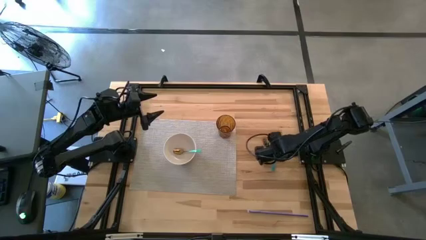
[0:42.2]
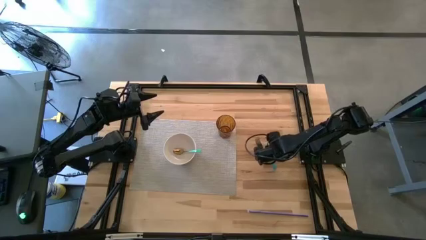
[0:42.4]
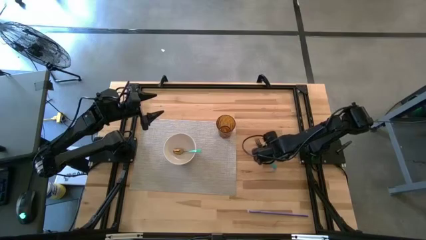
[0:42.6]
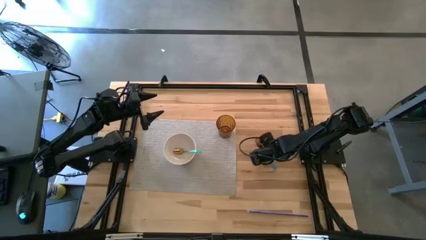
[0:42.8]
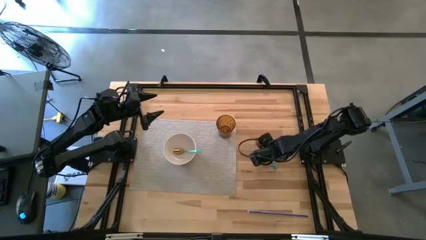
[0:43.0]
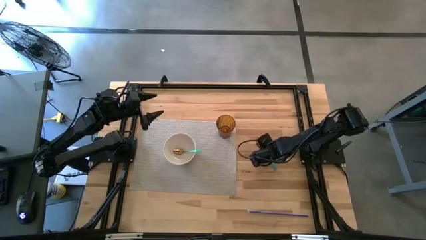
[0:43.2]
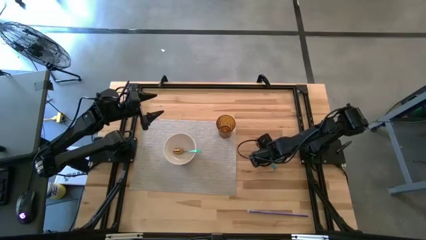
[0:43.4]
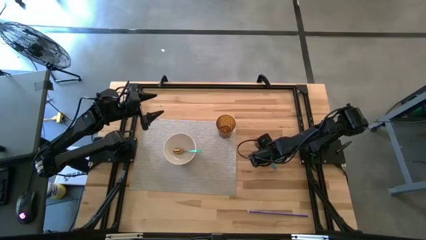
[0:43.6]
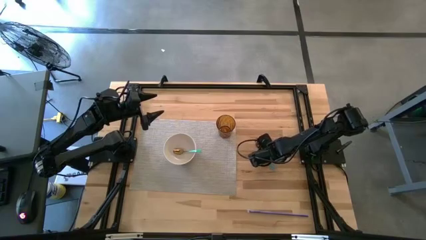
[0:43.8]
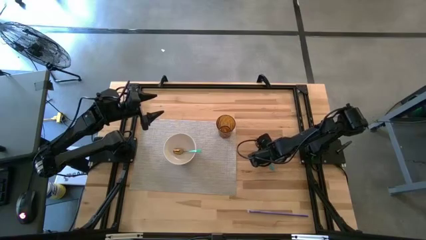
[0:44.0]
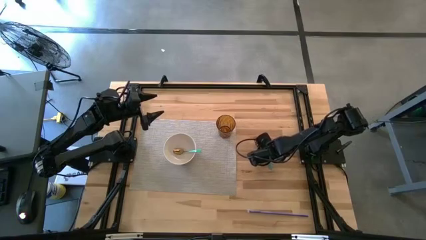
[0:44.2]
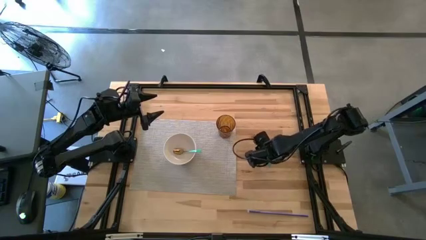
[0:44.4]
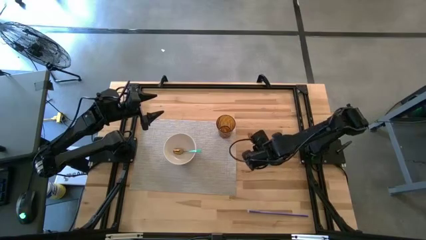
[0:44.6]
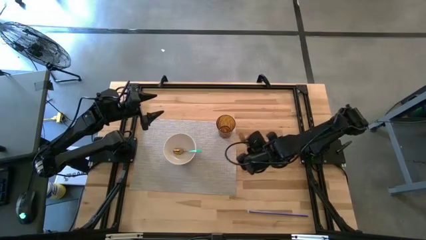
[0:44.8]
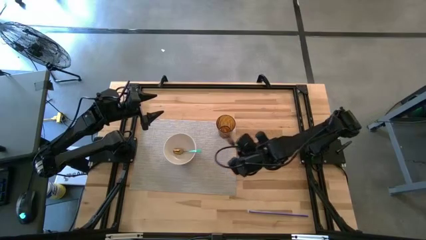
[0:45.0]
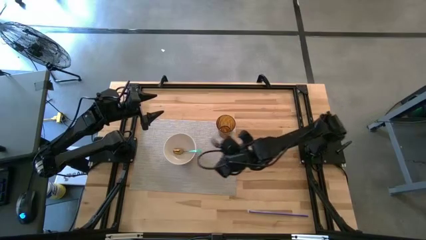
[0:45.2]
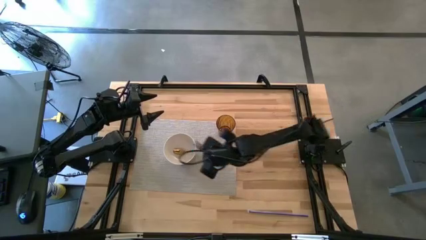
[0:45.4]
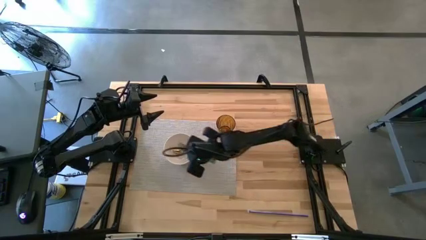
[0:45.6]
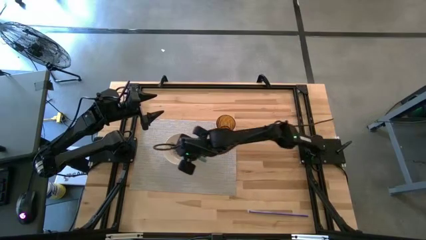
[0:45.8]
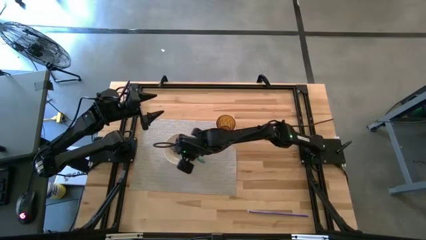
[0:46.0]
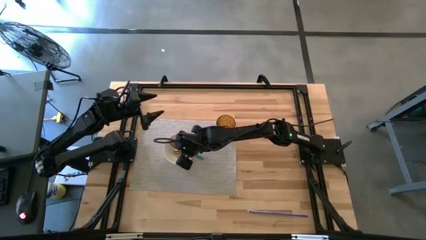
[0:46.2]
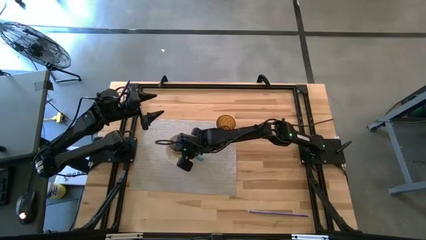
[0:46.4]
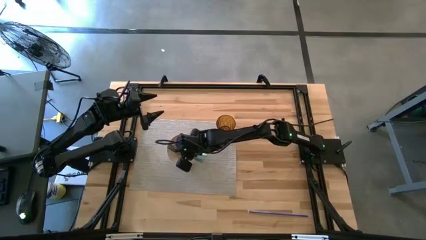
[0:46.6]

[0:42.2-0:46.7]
Task: Pick & Place Utensil
Put the blue fork into the white bowl on the gray mat

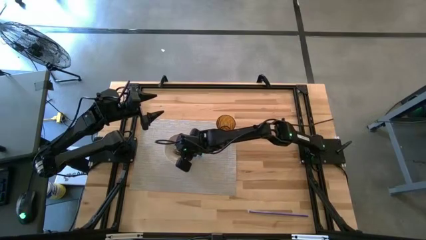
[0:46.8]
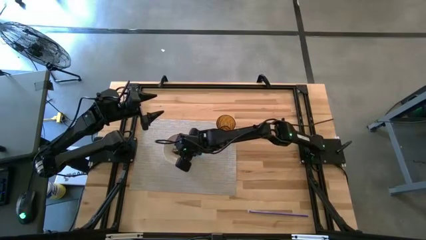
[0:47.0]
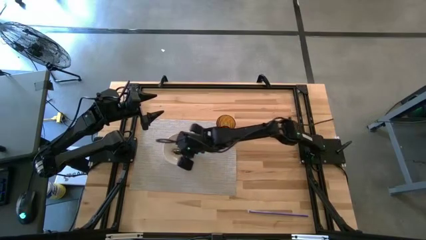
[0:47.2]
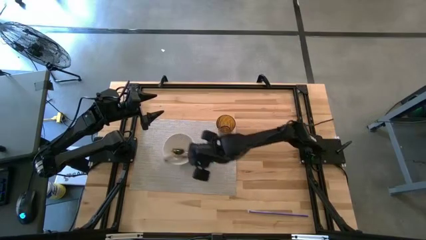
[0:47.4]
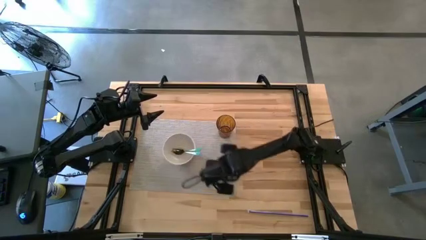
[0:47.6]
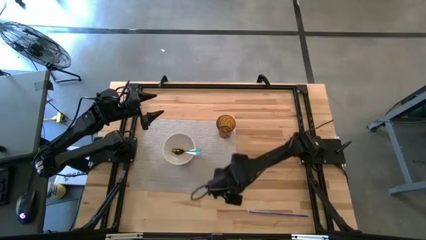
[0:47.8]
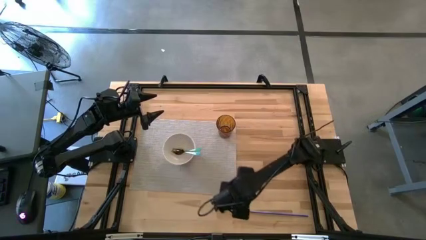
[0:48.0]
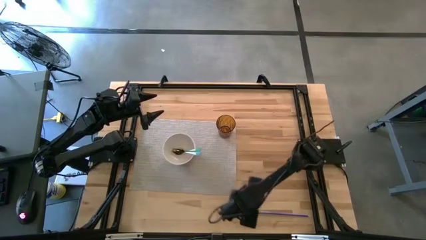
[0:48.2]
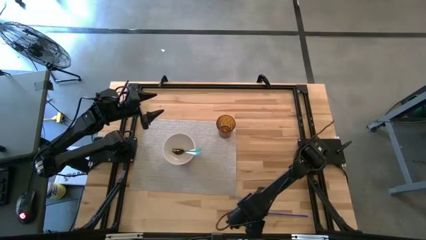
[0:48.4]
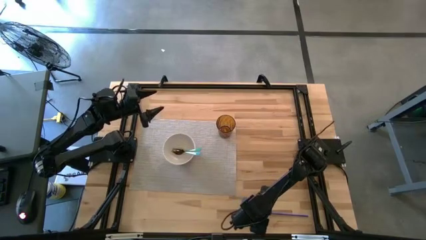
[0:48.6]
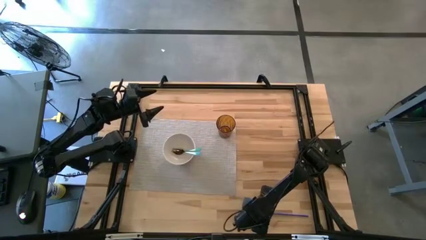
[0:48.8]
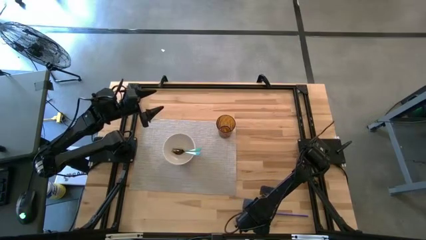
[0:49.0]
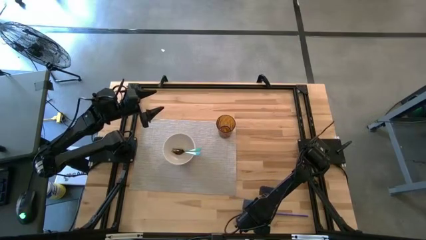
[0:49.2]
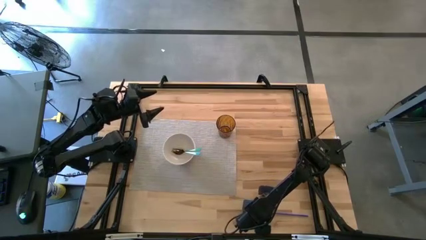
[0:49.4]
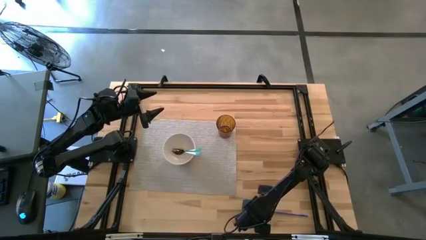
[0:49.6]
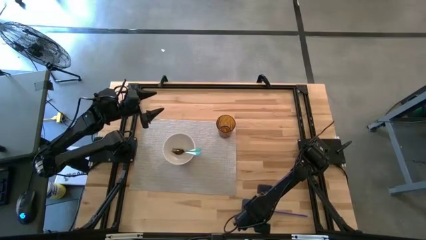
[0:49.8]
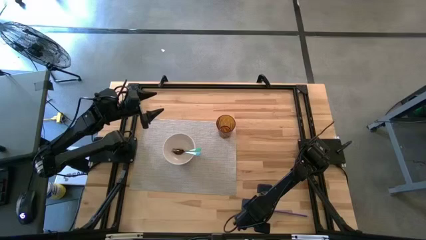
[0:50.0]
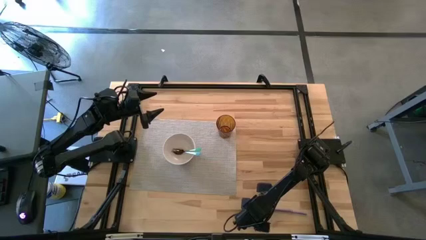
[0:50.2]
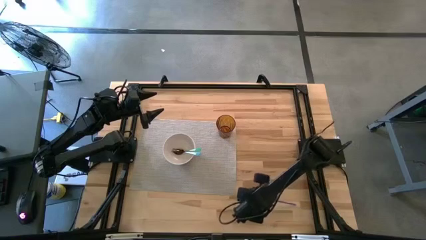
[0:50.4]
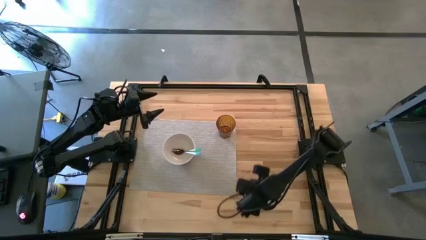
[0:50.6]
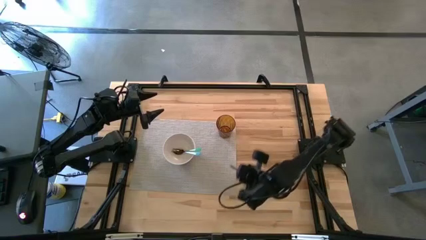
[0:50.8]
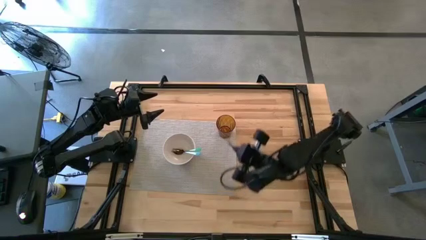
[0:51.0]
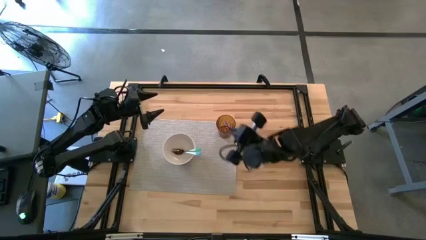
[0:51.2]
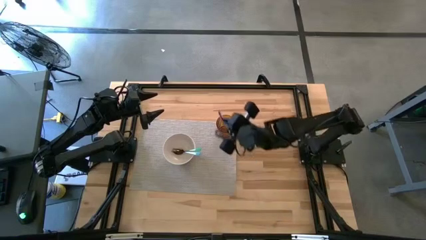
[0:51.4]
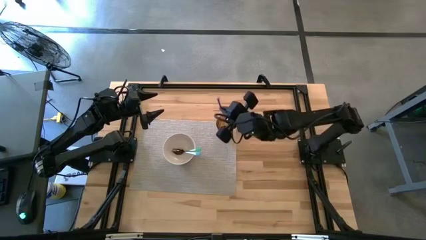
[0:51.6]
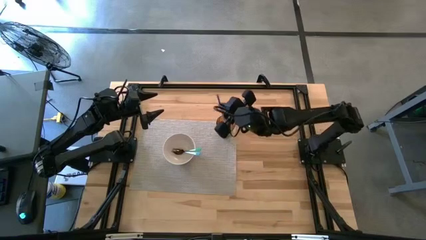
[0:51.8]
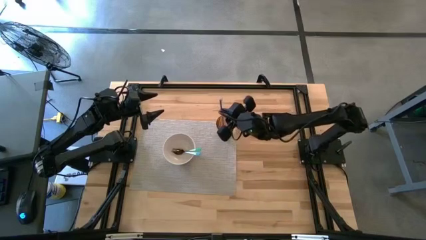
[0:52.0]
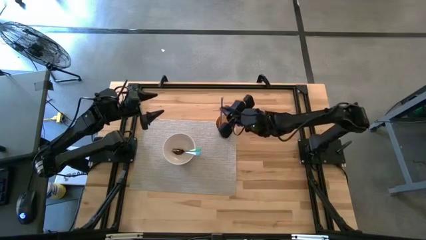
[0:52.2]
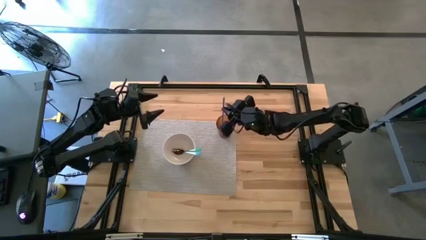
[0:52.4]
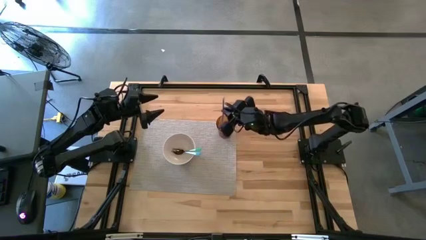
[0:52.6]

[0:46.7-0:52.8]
Put the violet straw into the orange cup on the gray mat

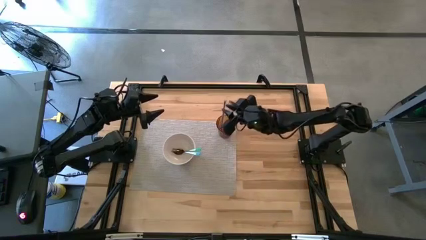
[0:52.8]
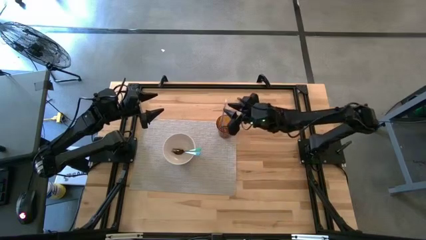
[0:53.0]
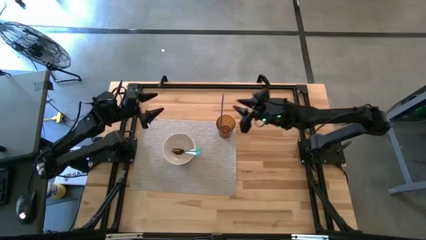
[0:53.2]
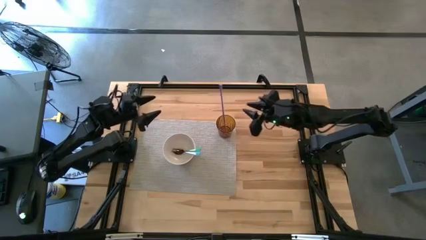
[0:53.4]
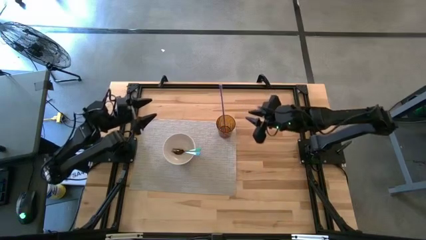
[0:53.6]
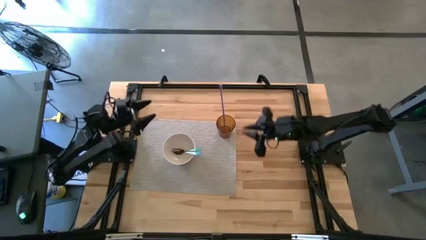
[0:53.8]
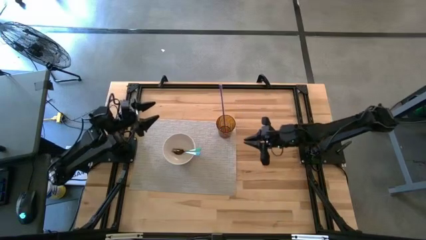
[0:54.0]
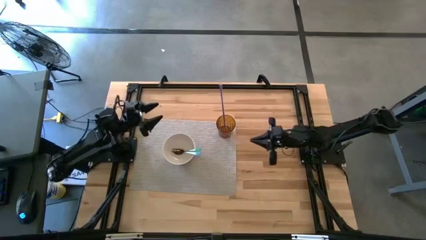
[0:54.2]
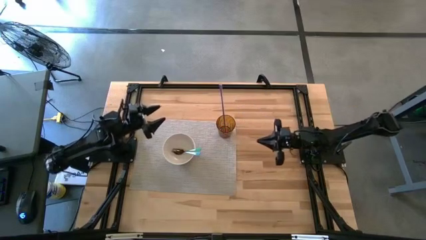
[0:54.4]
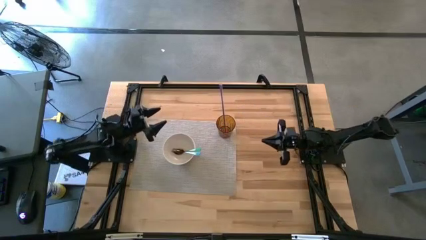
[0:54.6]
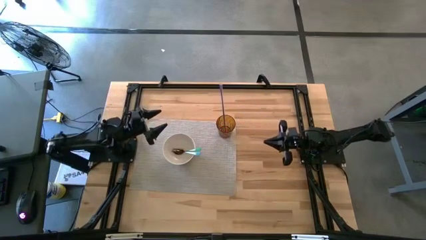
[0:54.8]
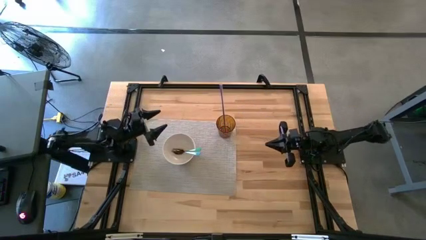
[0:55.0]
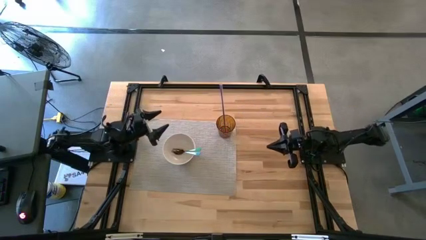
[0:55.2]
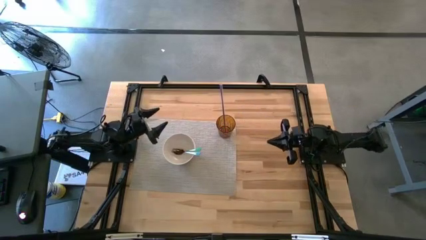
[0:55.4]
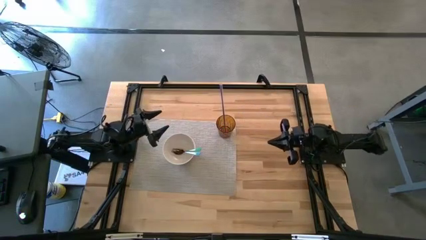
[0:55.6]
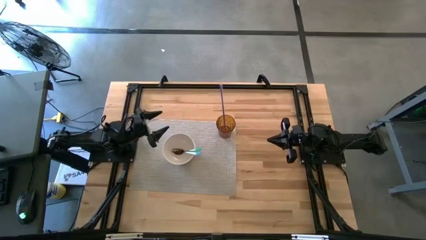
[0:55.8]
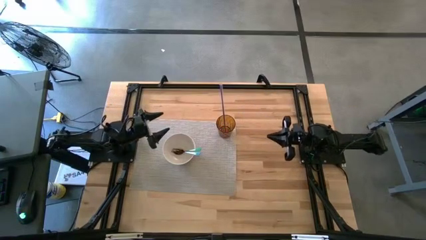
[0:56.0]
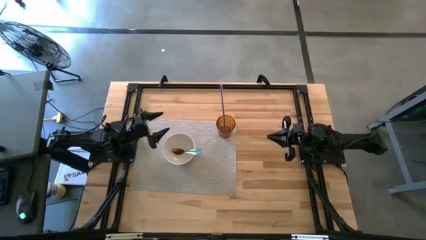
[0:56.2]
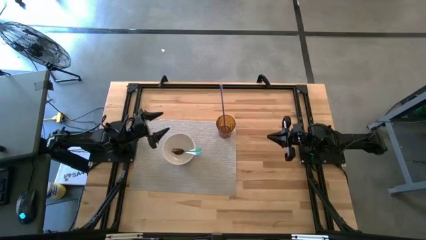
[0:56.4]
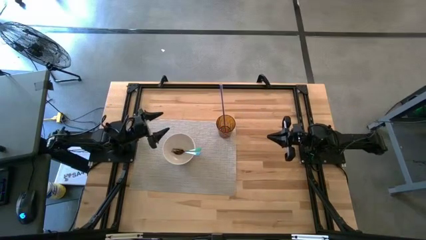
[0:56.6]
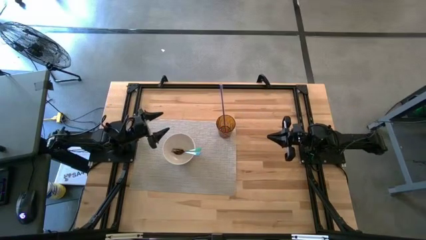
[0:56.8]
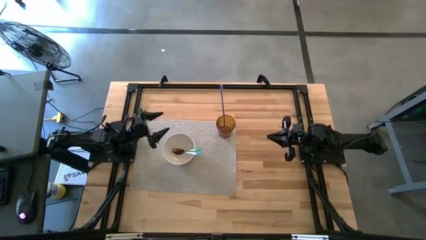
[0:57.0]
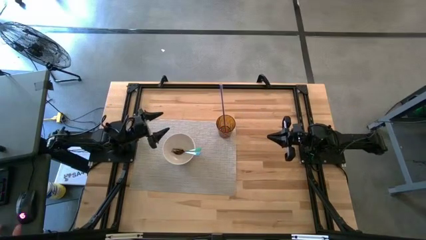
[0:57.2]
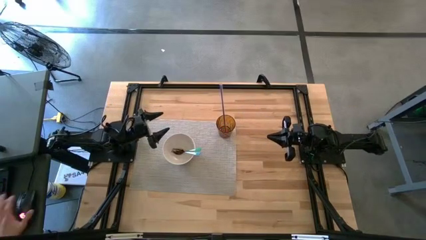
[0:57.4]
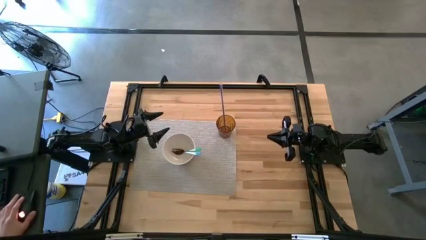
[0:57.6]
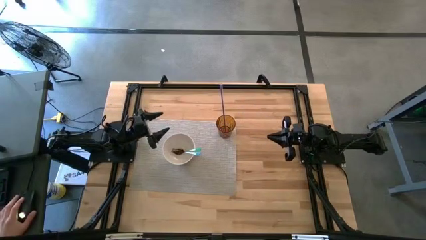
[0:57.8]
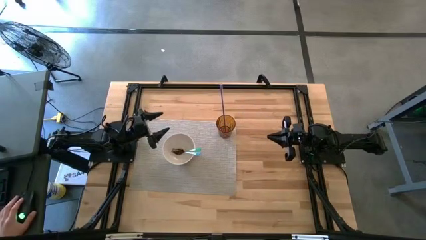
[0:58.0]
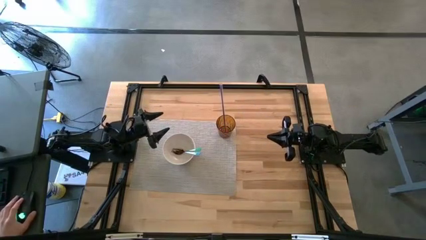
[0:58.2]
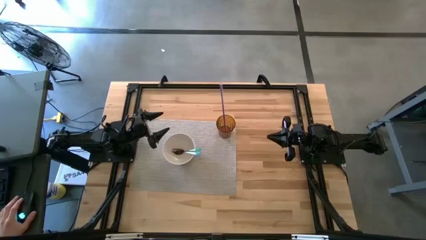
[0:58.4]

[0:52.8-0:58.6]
Return to Home Position
